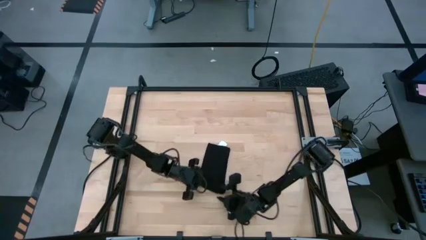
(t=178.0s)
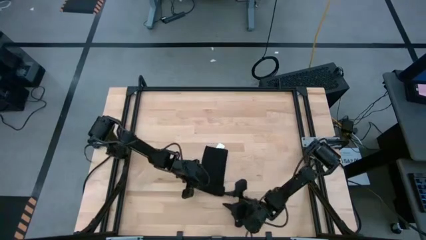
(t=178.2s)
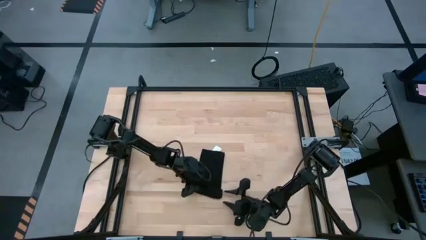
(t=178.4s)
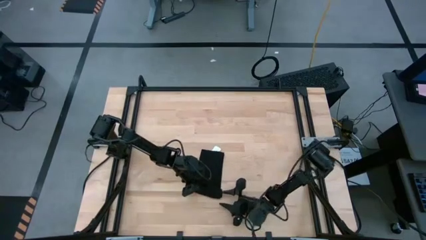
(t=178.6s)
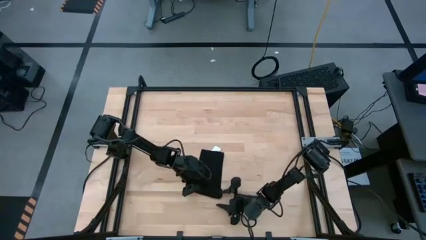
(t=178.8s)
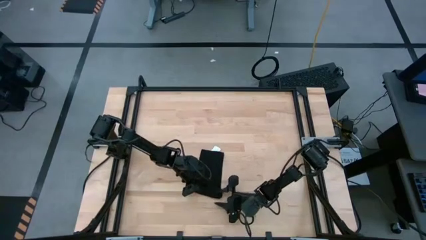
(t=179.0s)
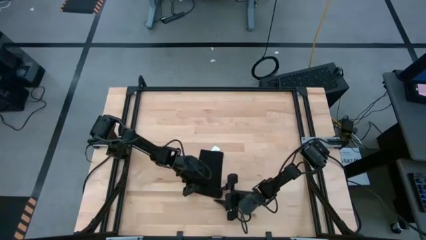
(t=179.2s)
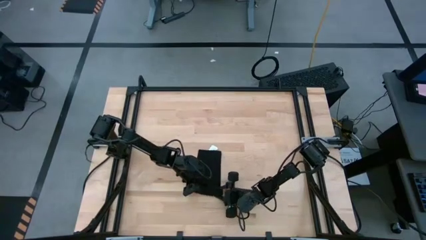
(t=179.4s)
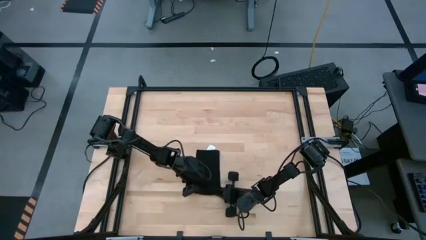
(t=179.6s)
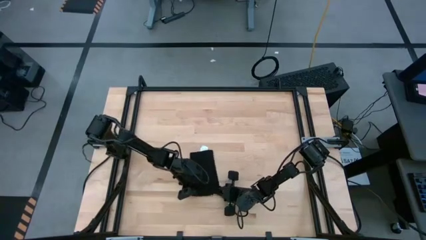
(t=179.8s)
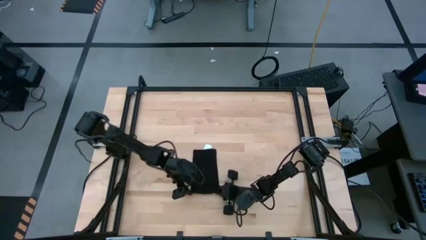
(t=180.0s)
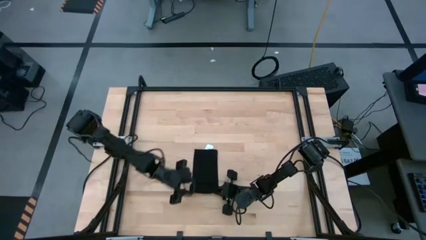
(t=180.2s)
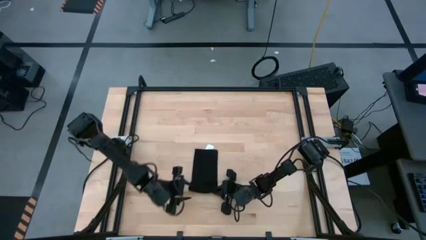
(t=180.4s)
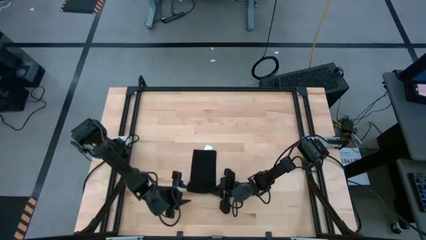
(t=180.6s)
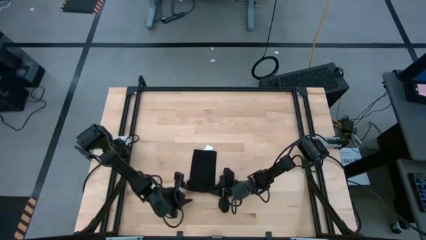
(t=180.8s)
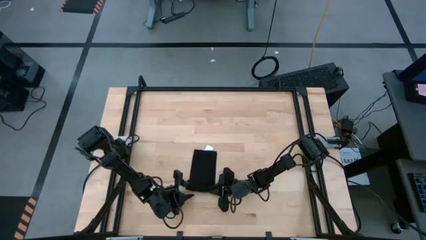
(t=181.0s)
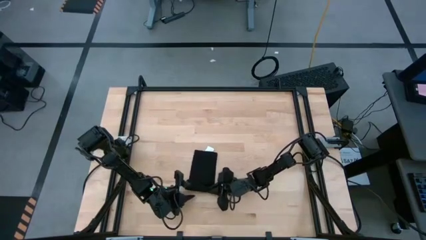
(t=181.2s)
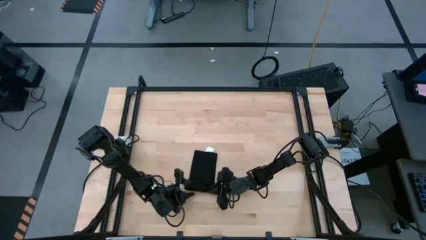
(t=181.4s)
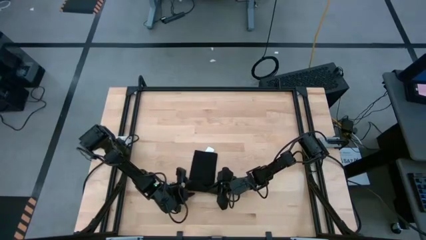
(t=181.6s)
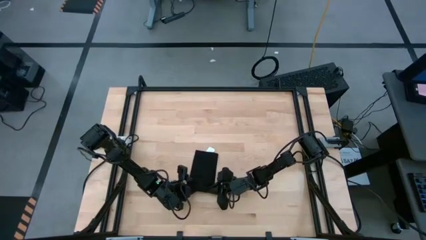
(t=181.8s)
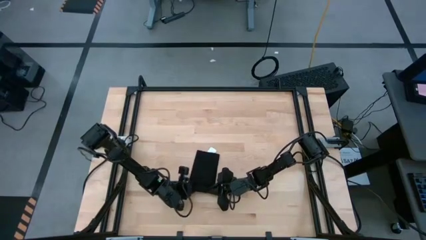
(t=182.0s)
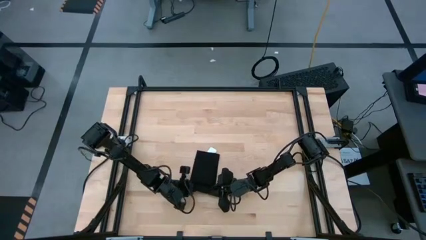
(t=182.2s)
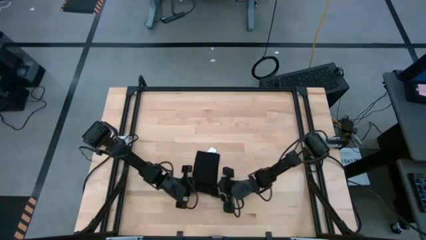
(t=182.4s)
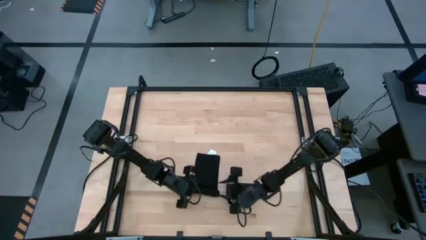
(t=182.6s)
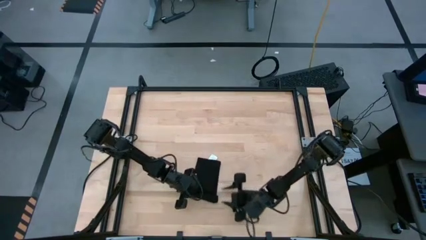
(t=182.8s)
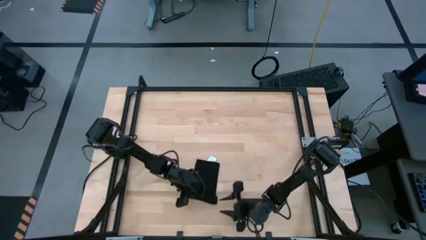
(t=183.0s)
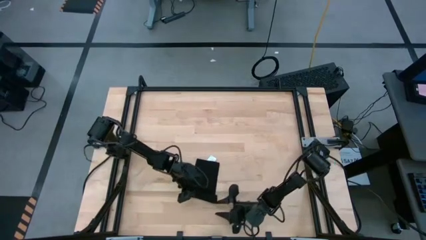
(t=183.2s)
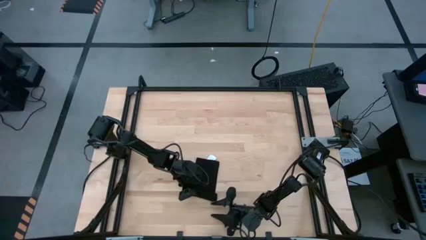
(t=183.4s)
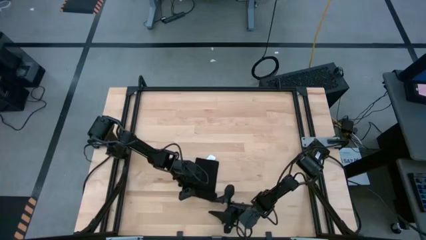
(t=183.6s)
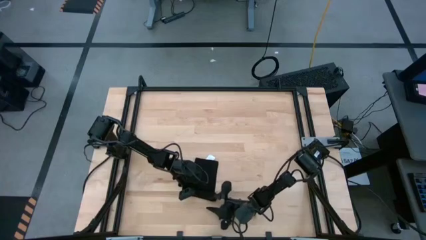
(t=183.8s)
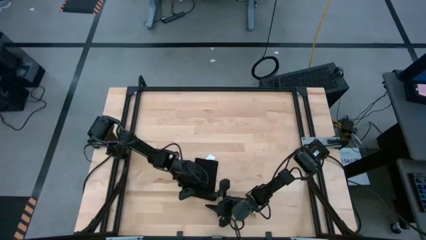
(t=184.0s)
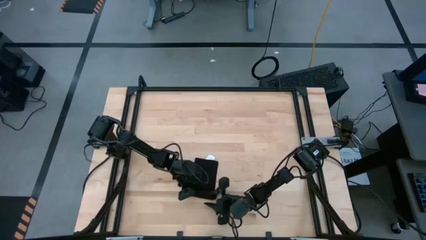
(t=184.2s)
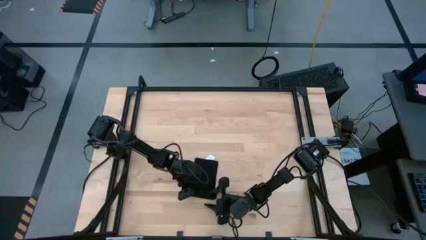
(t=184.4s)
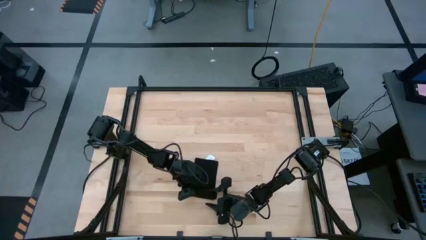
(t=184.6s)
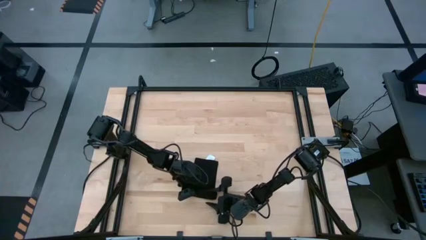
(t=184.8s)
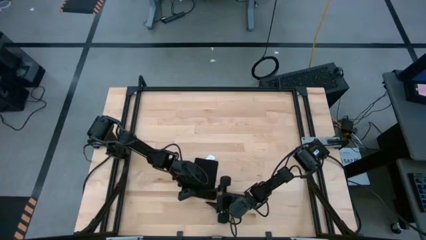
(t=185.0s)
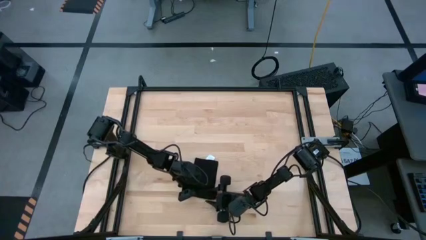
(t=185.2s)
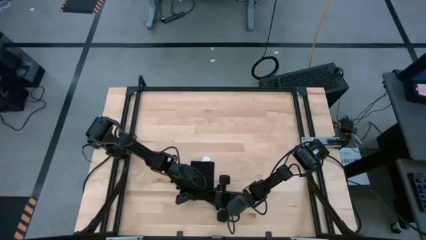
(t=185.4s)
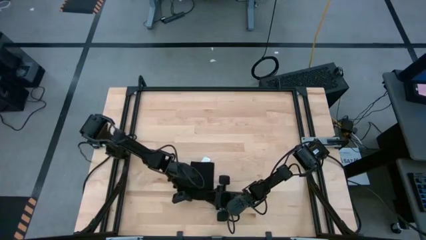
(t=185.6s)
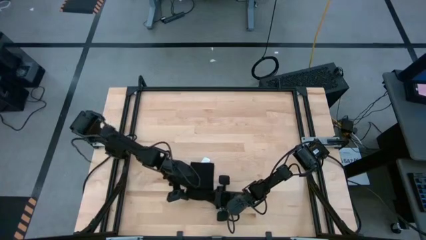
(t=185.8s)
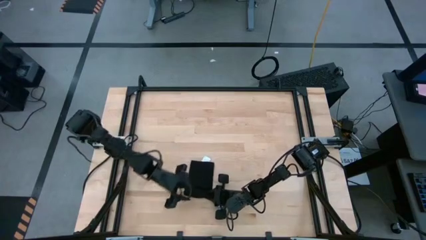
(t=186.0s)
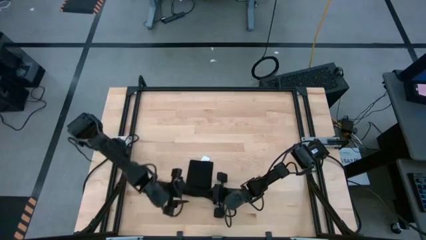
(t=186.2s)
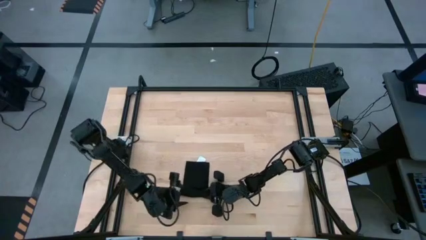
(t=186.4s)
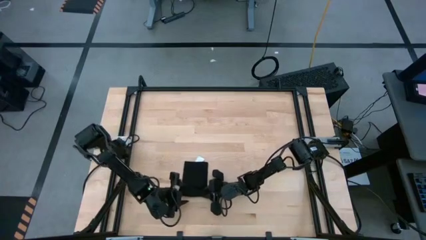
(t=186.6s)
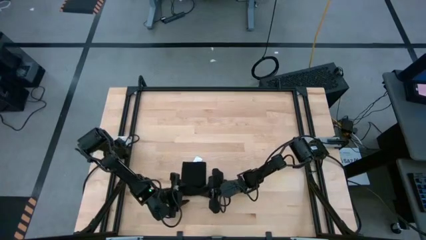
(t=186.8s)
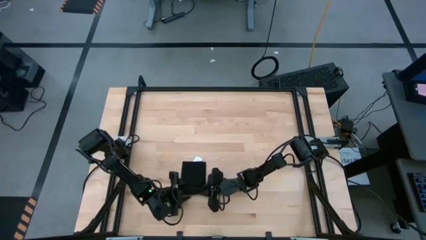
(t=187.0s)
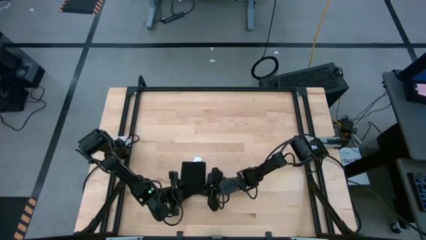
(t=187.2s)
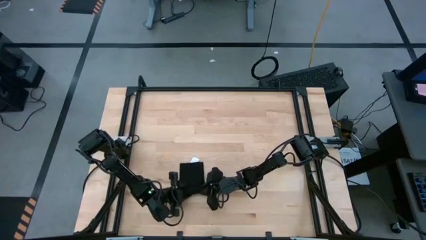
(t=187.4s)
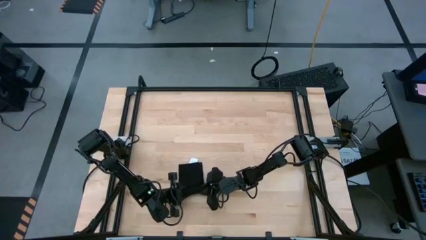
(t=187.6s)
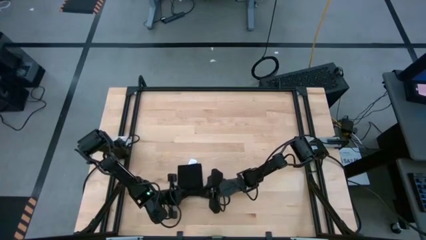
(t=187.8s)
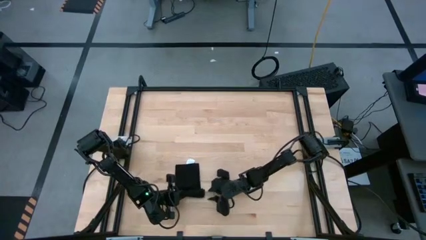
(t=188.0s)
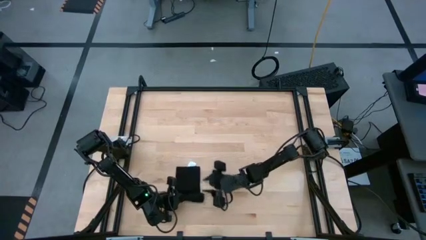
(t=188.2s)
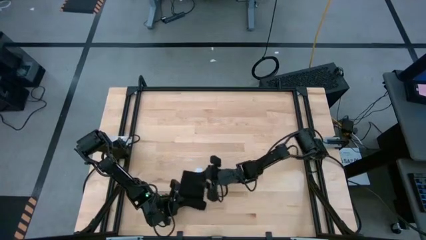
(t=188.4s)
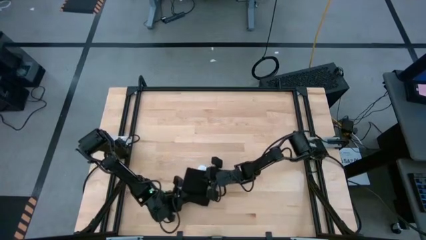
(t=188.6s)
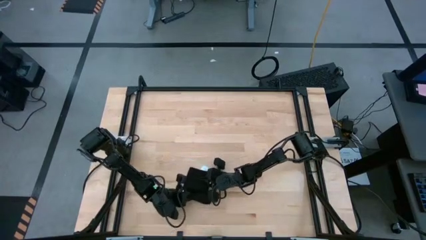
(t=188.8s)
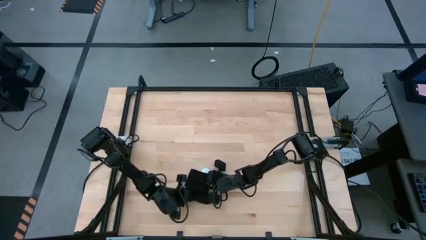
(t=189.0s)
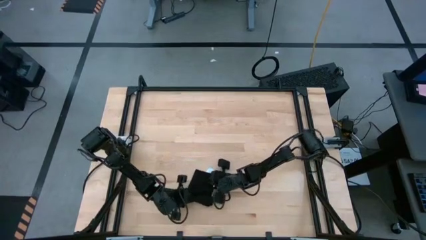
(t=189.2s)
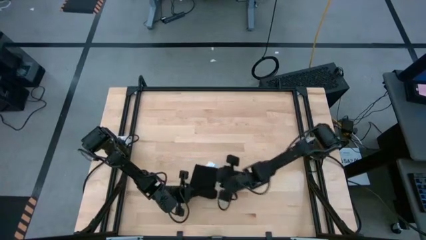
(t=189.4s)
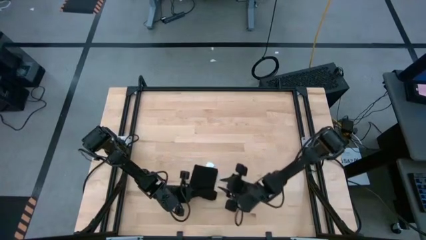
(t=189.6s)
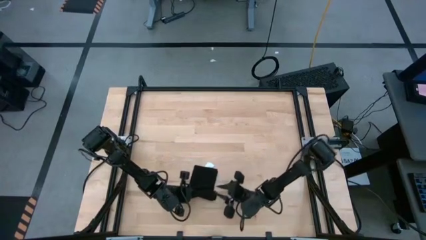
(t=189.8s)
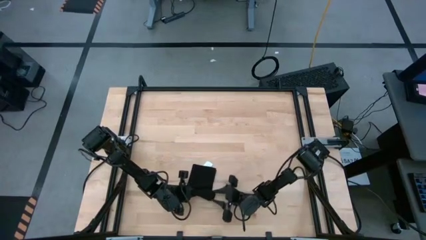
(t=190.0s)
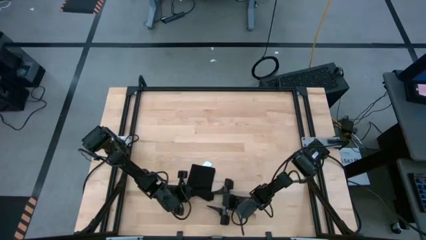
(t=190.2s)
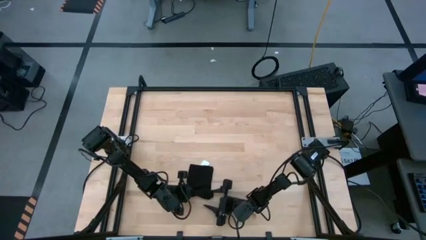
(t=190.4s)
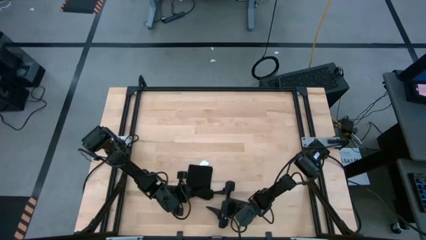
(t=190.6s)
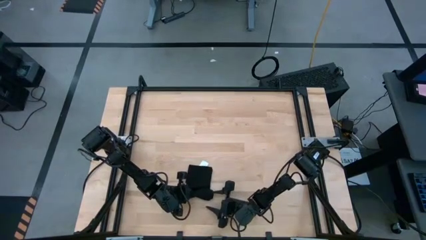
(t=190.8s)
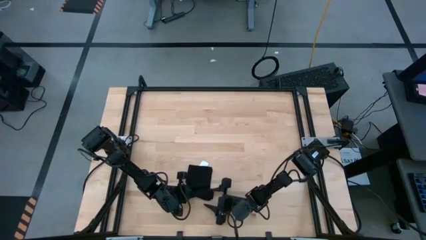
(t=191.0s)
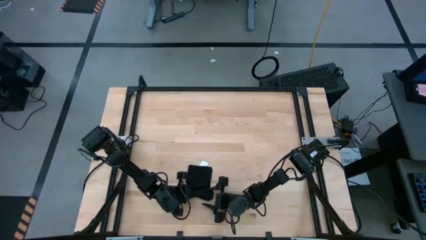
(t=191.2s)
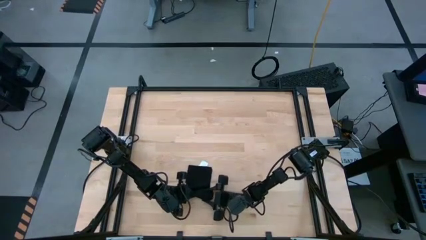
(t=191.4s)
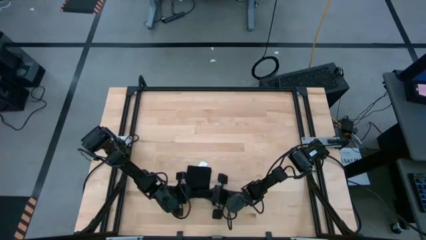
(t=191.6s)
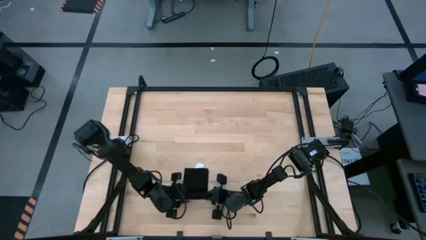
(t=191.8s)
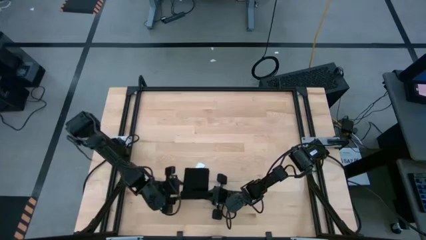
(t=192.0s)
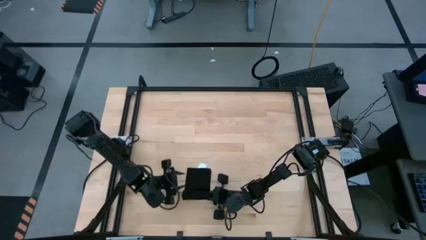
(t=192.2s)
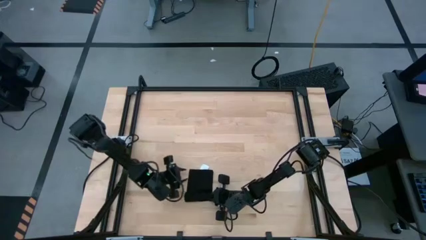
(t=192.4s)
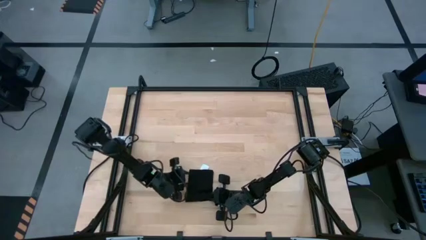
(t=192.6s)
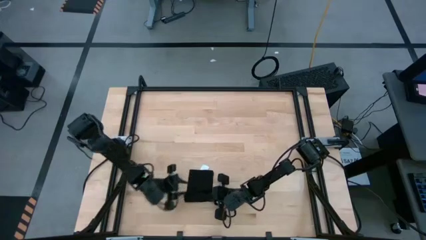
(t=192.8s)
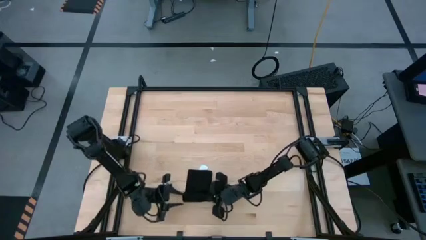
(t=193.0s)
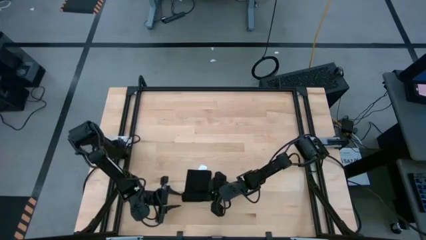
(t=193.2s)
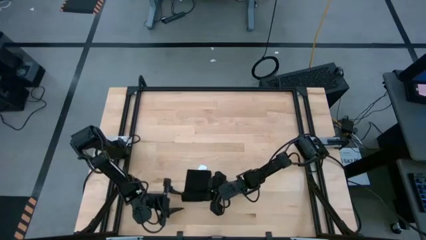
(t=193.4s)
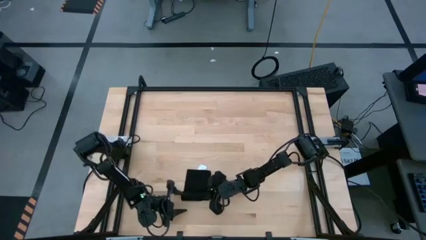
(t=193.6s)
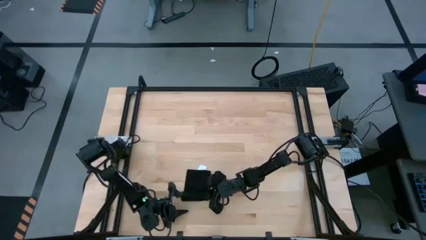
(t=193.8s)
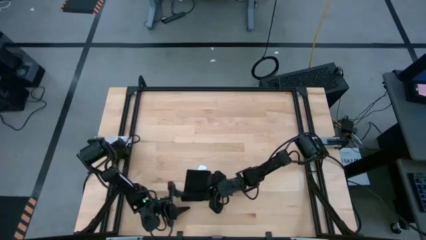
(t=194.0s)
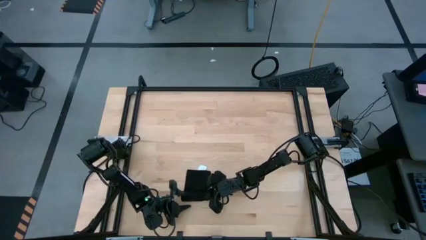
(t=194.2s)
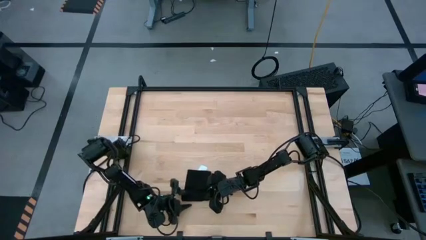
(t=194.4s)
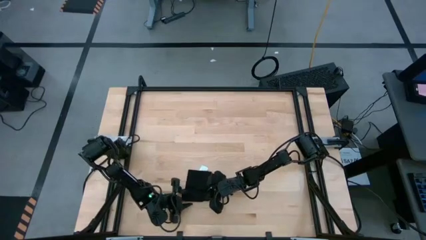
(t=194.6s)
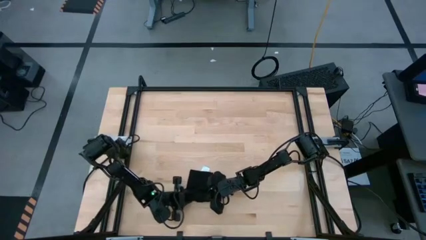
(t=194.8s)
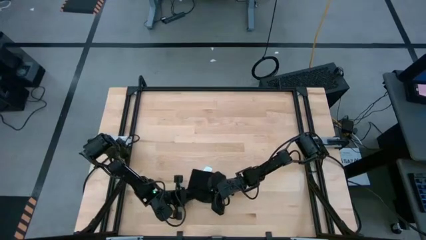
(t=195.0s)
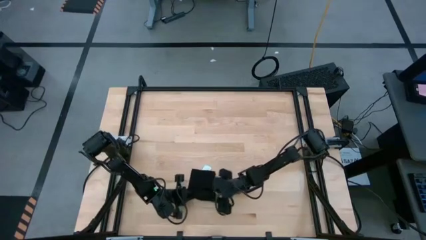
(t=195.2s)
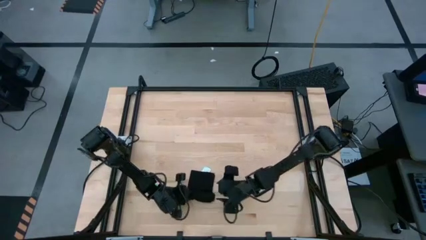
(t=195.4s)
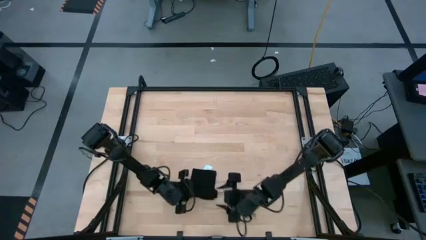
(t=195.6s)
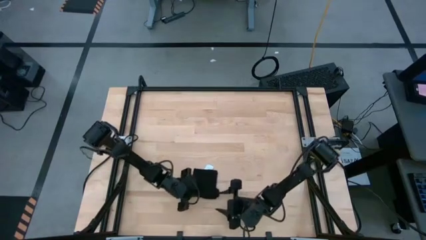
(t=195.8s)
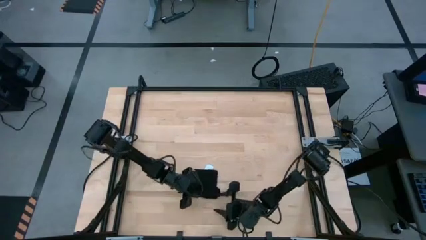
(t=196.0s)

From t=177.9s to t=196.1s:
Task: Roll napkin
Roll the black napkin
